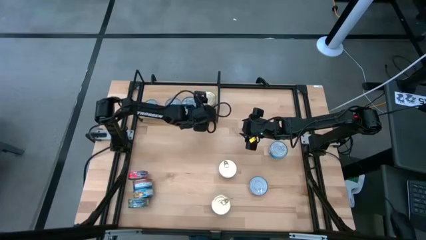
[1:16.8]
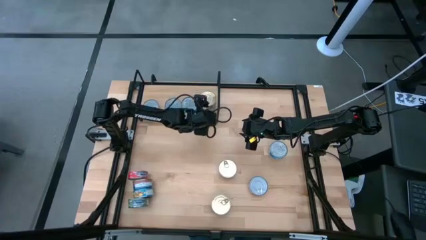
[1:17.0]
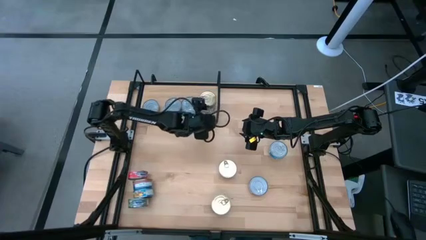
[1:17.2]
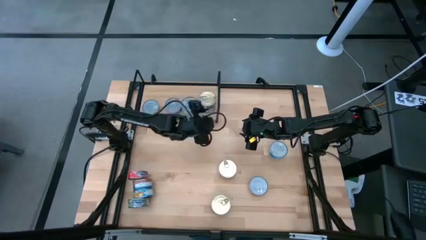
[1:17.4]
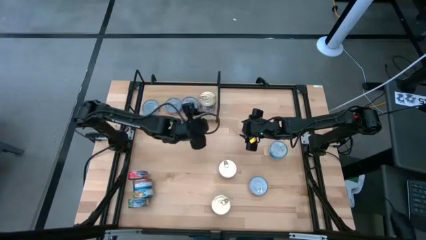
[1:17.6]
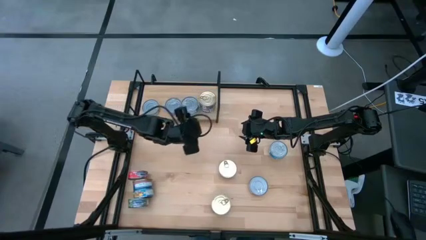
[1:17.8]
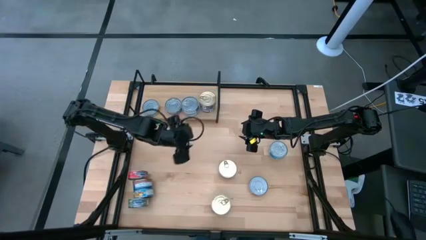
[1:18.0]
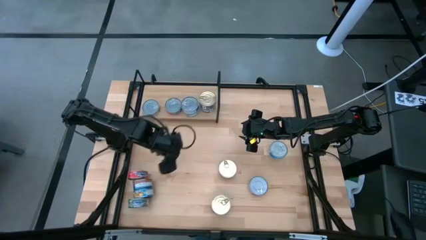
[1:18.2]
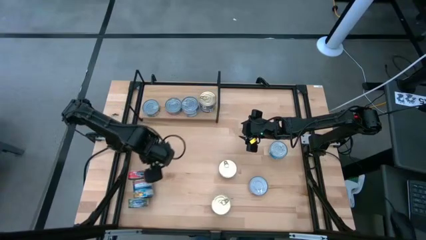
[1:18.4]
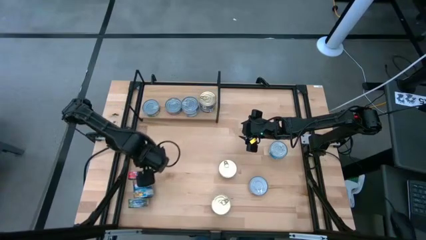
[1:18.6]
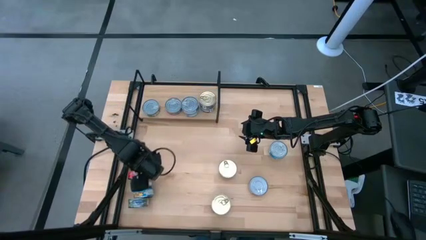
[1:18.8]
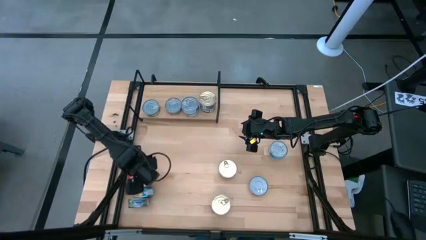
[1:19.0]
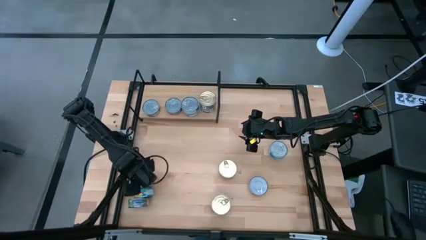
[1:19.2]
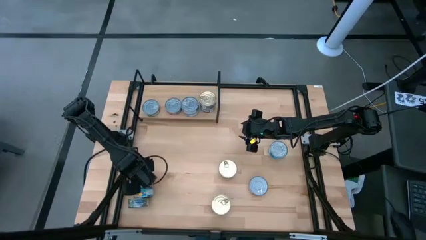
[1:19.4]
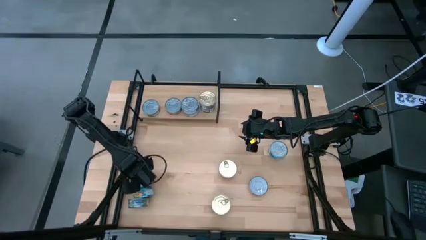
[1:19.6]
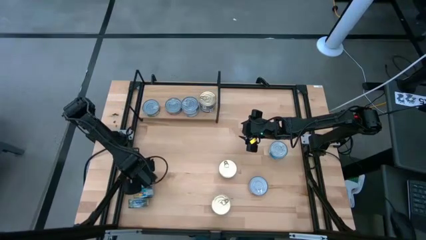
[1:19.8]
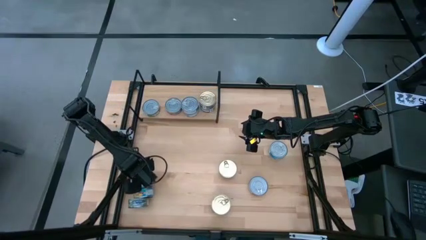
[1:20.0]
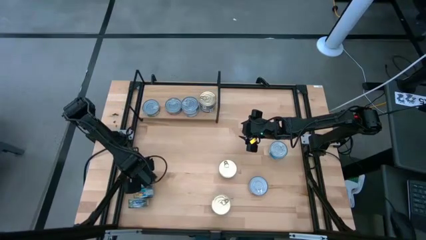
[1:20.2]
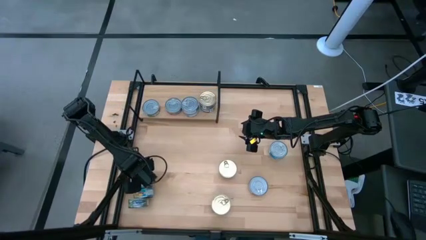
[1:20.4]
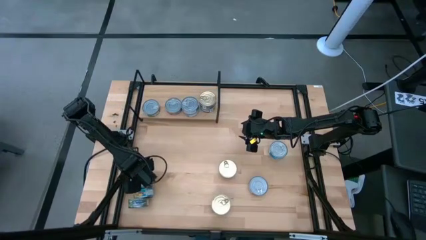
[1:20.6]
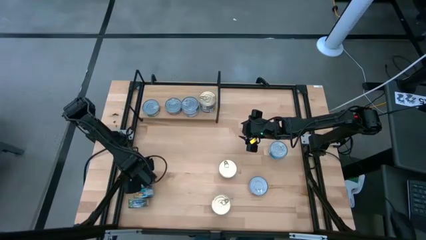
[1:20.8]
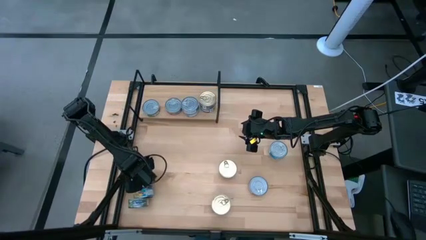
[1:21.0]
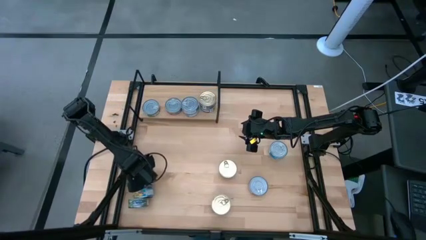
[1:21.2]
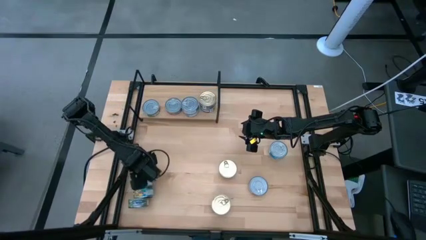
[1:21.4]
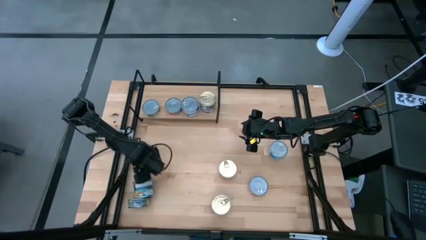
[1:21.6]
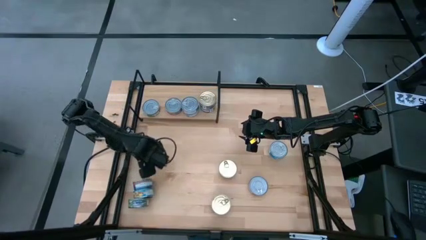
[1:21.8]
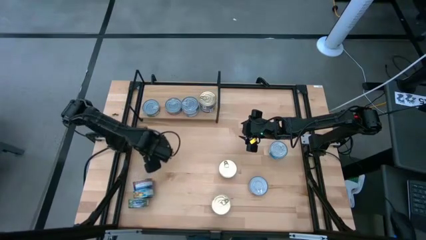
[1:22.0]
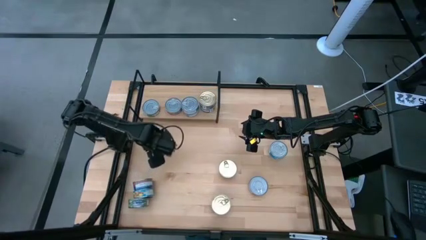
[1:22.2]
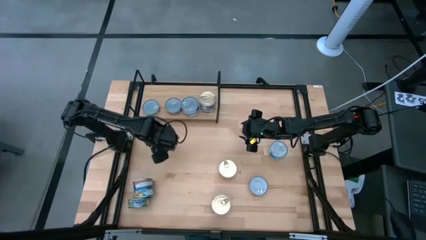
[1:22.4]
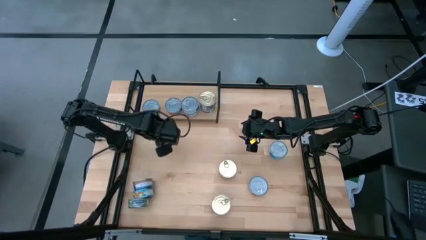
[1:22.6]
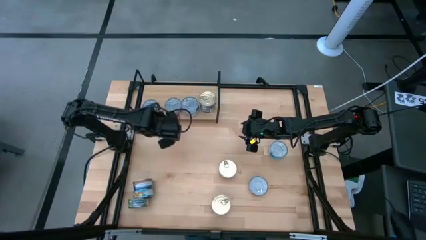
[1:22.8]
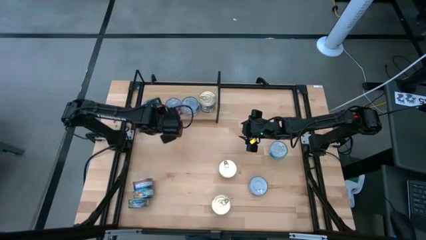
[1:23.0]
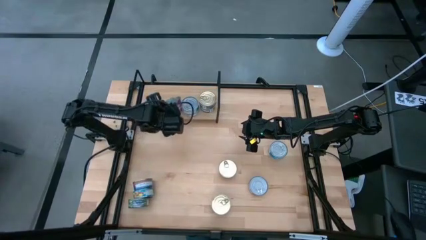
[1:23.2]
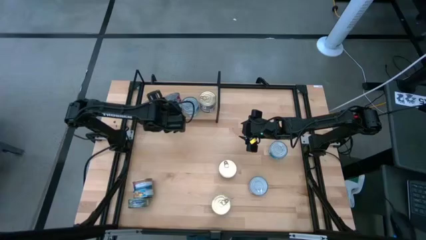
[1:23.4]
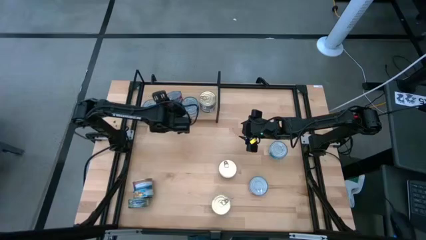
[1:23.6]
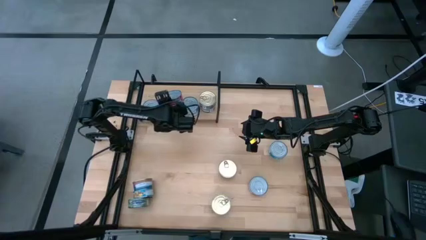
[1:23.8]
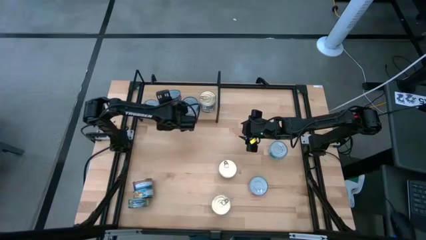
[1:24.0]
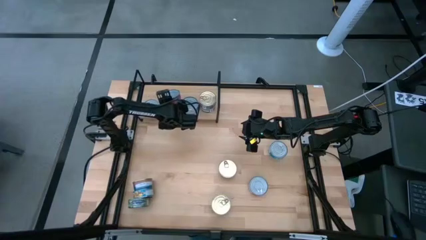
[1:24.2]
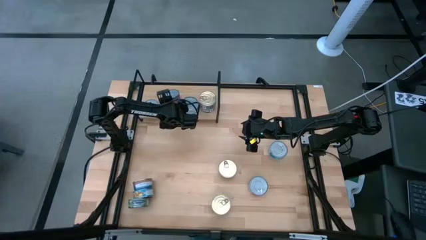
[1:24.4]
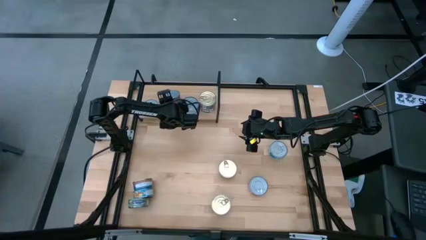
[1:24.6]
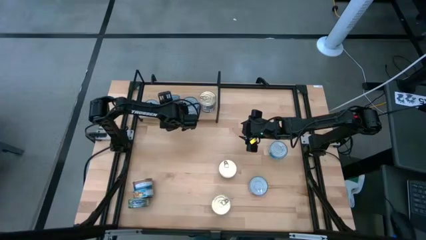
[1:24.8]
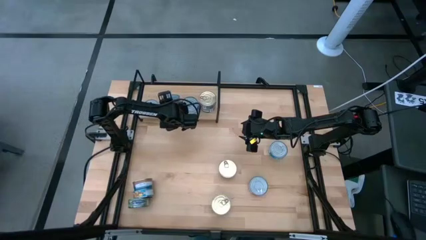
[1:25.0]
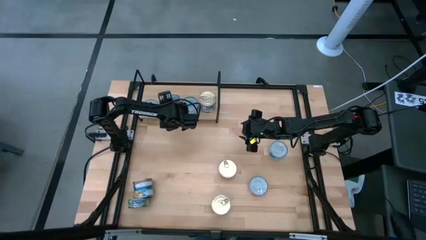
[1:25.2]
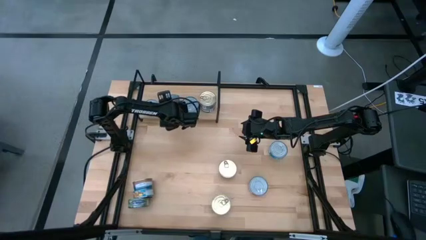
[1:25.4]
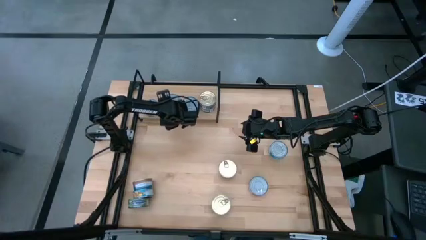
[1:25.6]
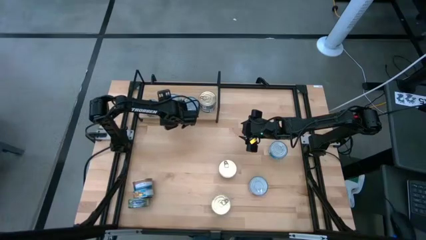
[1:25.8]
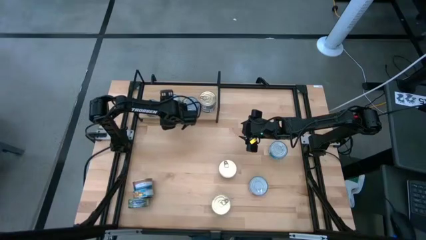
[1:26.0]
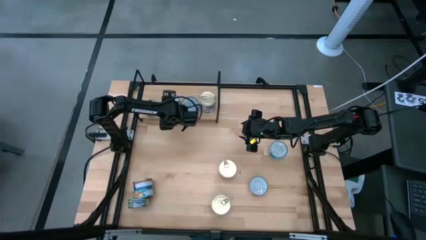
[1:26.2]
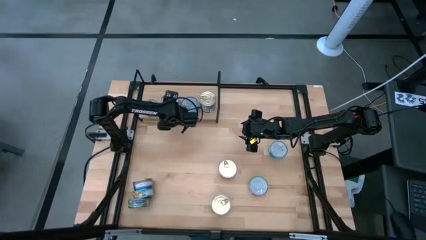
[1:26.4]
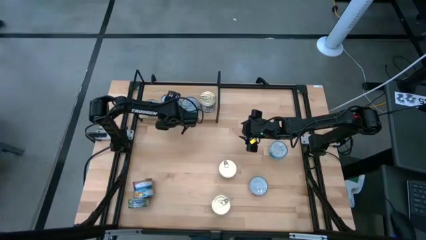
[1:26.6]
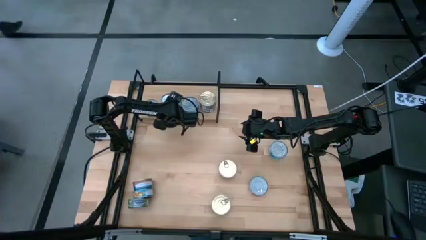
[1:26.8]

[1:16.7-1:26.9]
Task: Stack canned seafood by type on shelf
Stack the left red tuna can on top of the red tuna can on the shelf
